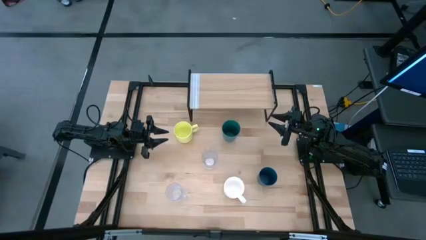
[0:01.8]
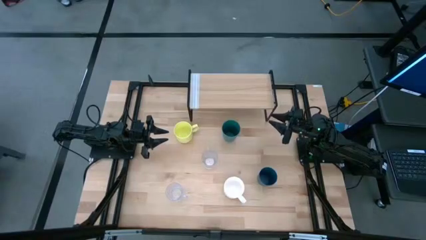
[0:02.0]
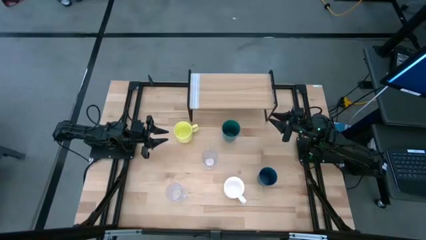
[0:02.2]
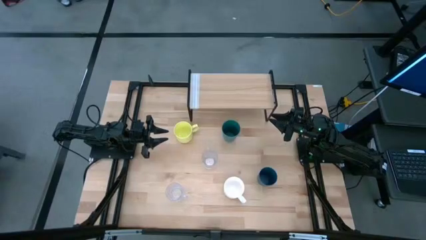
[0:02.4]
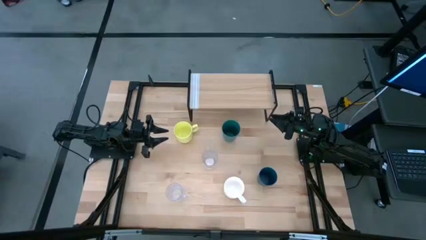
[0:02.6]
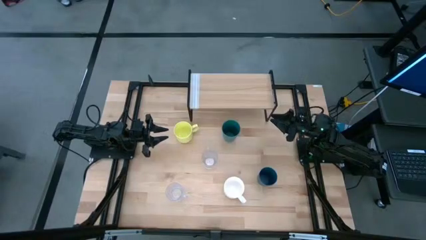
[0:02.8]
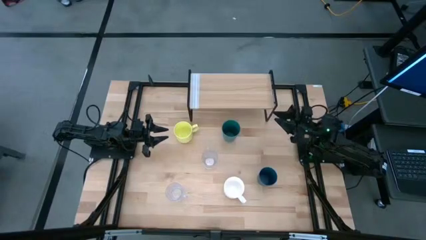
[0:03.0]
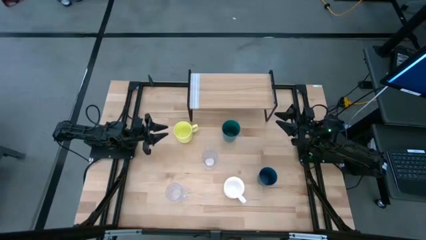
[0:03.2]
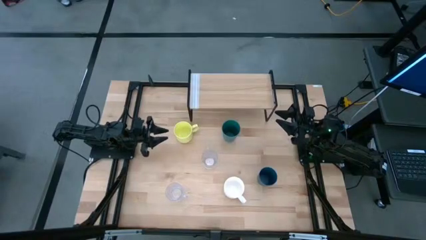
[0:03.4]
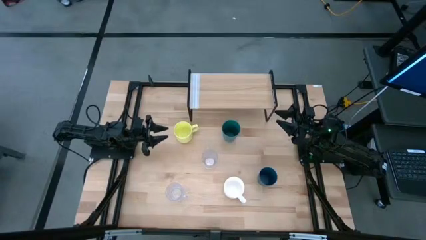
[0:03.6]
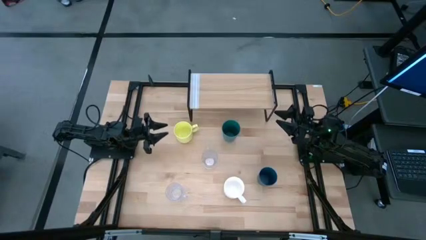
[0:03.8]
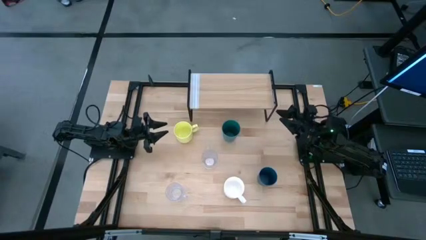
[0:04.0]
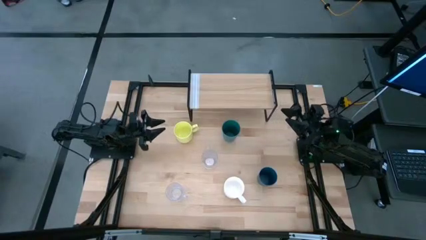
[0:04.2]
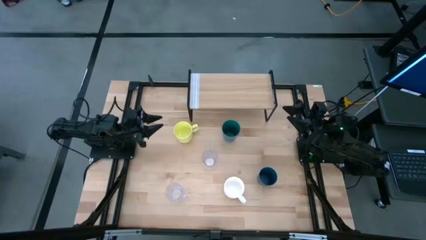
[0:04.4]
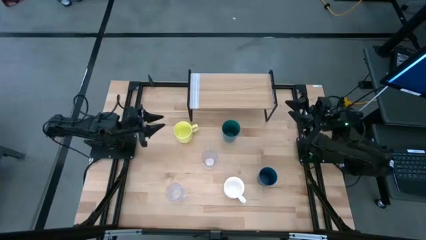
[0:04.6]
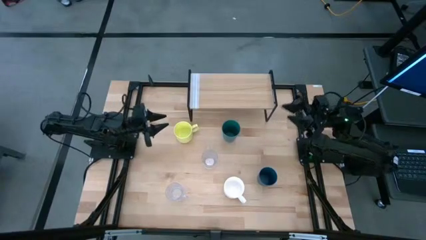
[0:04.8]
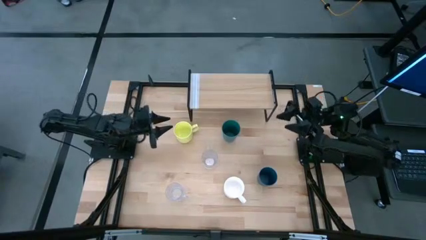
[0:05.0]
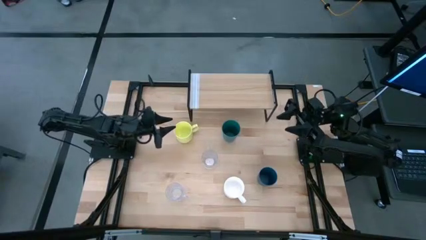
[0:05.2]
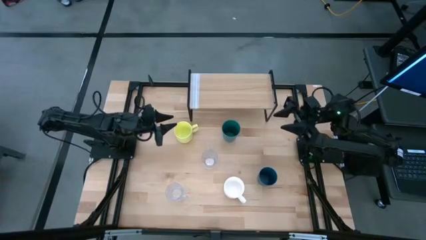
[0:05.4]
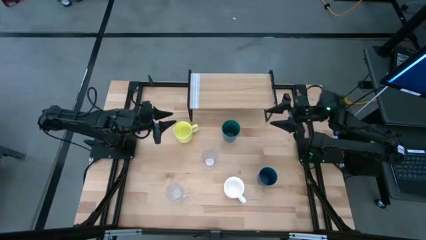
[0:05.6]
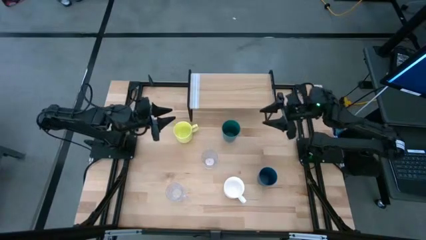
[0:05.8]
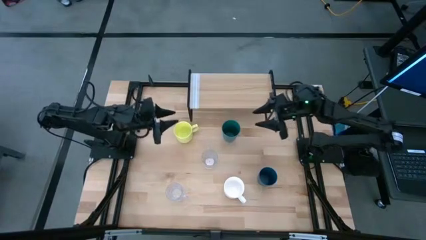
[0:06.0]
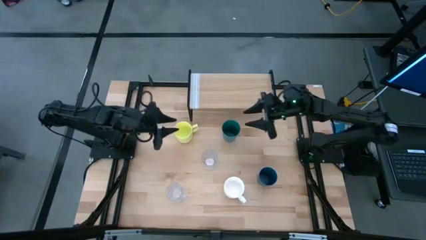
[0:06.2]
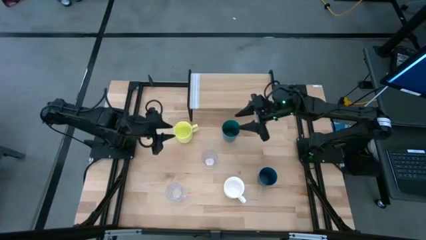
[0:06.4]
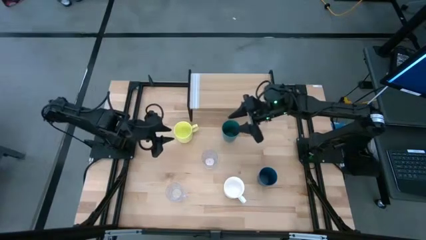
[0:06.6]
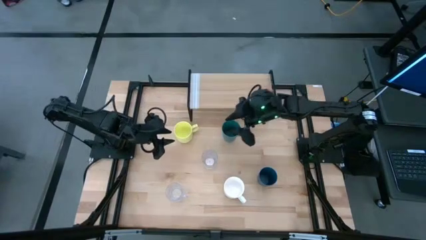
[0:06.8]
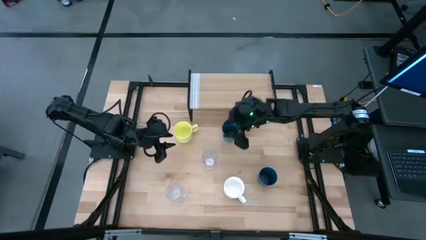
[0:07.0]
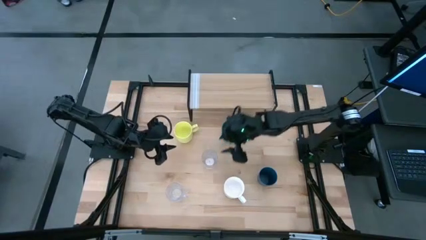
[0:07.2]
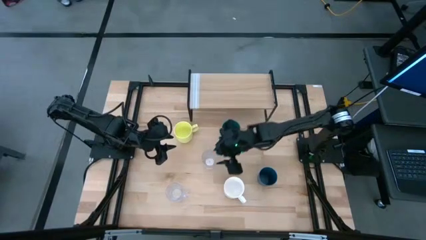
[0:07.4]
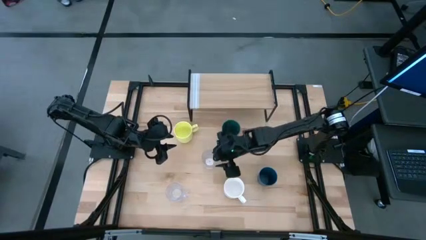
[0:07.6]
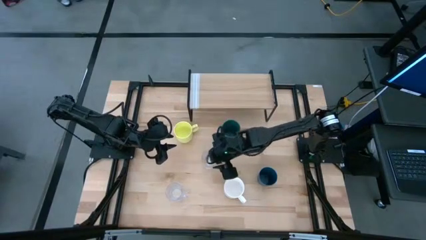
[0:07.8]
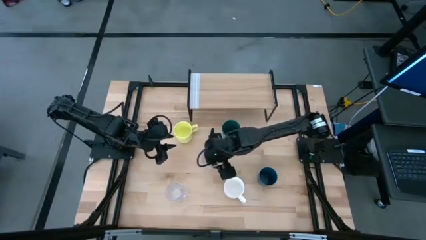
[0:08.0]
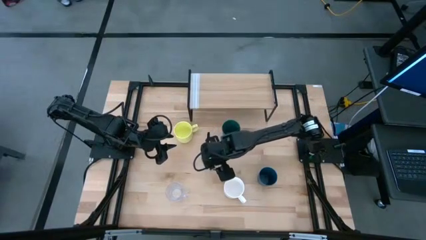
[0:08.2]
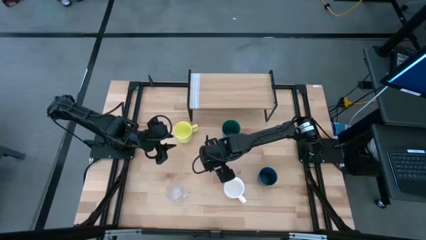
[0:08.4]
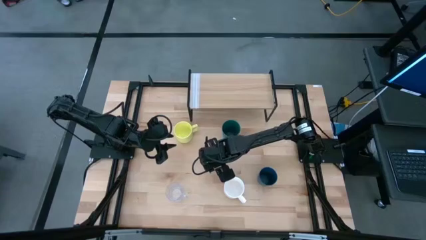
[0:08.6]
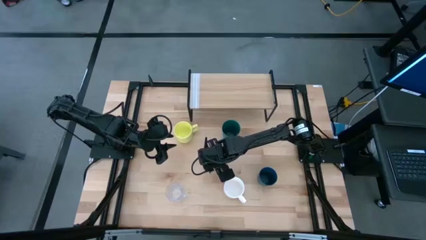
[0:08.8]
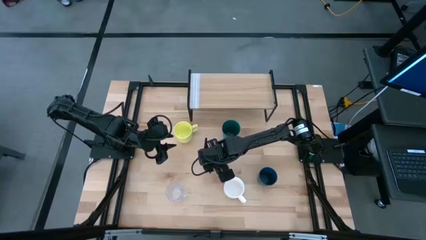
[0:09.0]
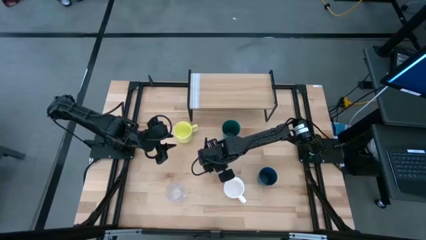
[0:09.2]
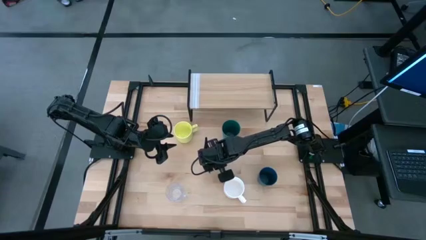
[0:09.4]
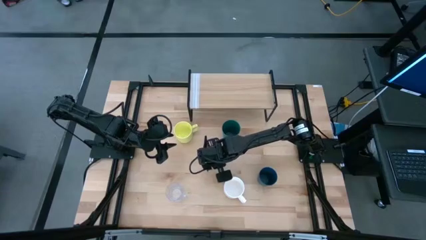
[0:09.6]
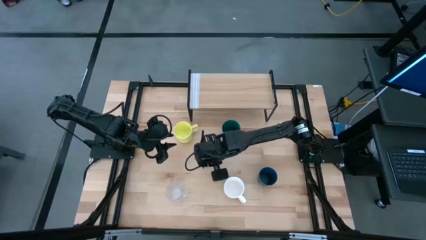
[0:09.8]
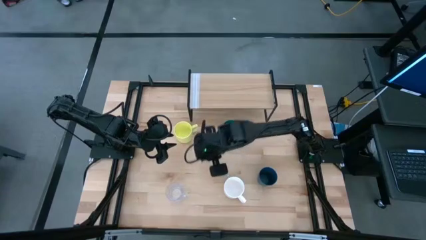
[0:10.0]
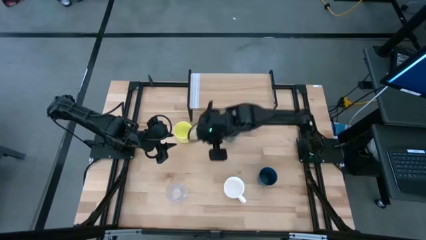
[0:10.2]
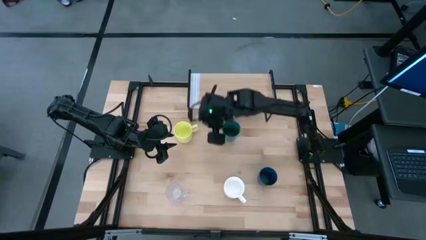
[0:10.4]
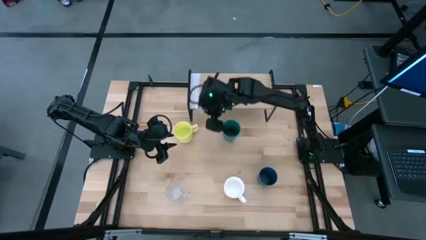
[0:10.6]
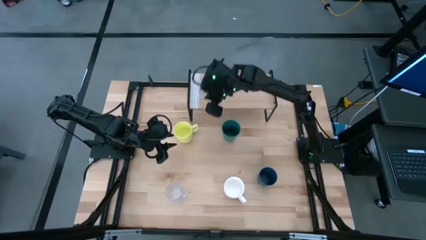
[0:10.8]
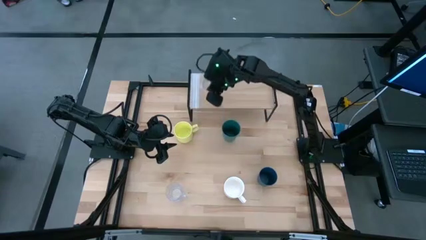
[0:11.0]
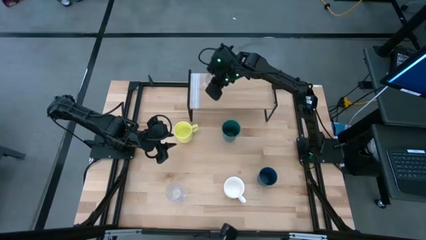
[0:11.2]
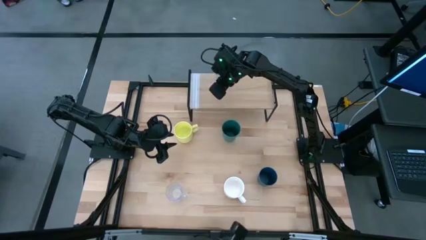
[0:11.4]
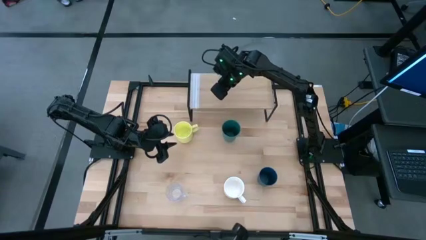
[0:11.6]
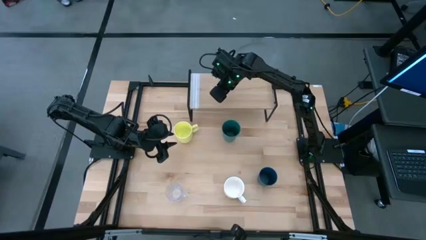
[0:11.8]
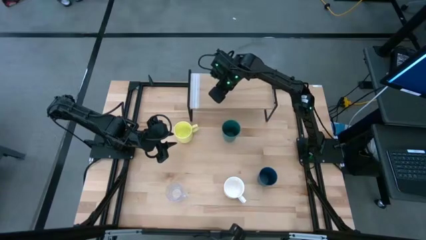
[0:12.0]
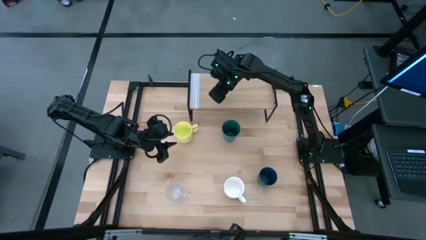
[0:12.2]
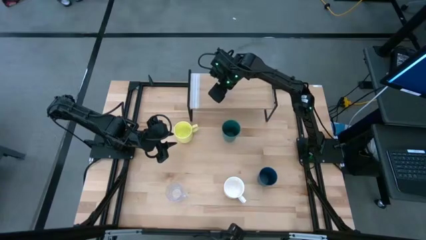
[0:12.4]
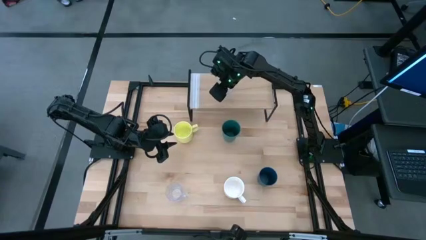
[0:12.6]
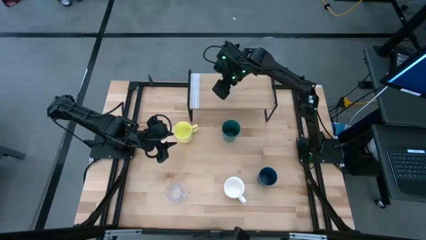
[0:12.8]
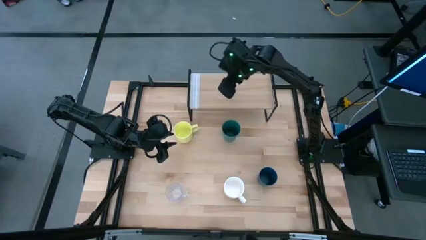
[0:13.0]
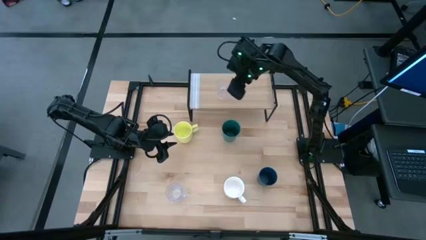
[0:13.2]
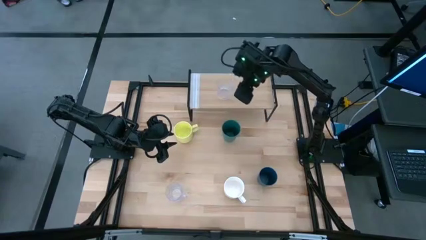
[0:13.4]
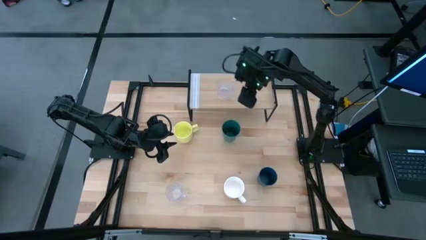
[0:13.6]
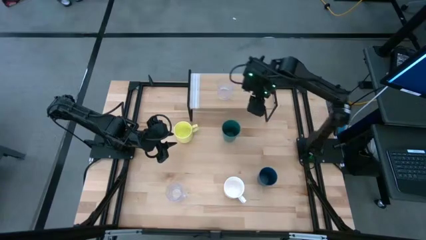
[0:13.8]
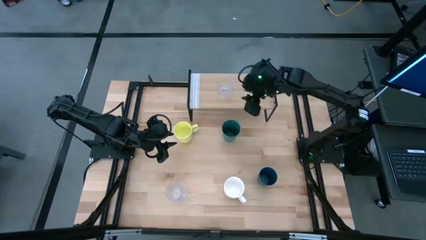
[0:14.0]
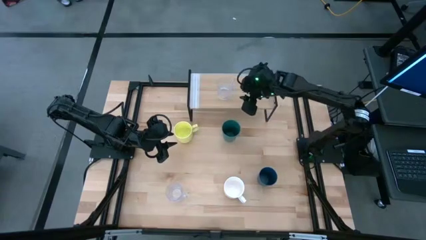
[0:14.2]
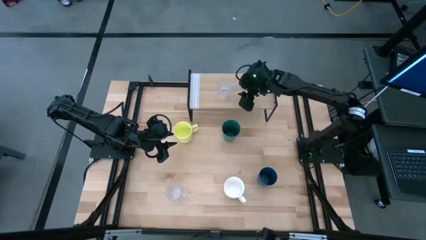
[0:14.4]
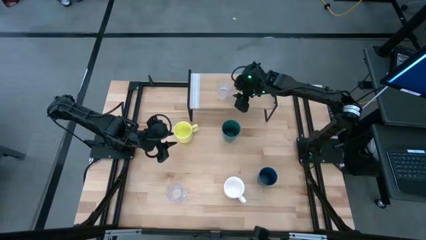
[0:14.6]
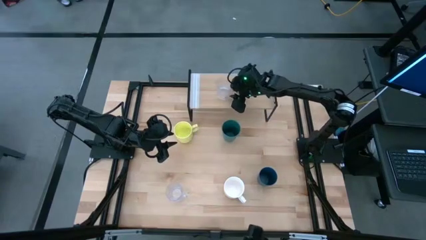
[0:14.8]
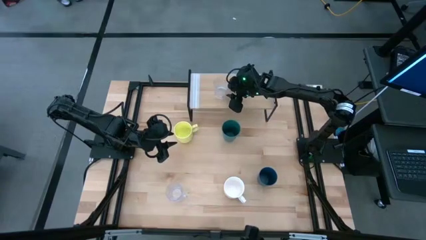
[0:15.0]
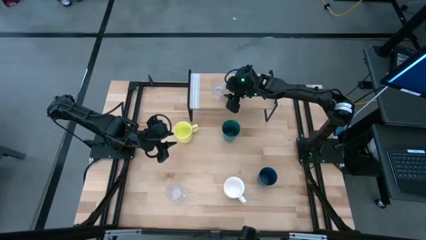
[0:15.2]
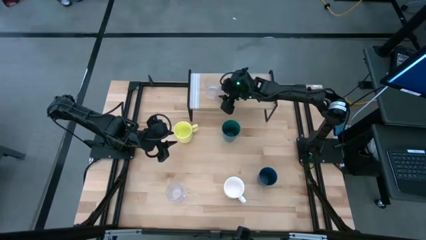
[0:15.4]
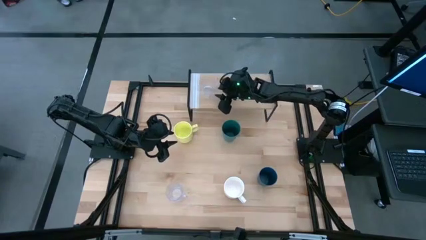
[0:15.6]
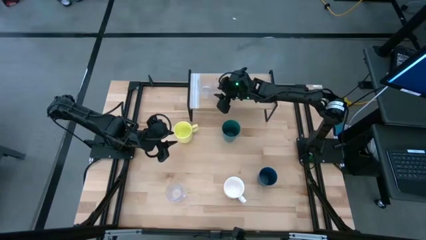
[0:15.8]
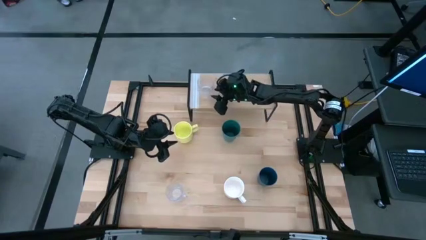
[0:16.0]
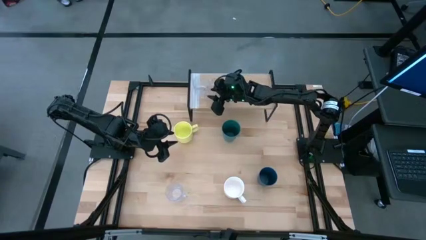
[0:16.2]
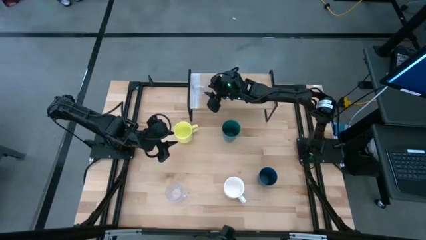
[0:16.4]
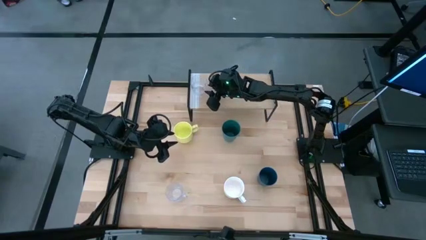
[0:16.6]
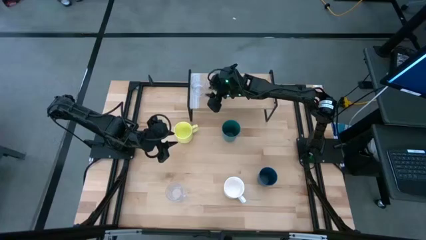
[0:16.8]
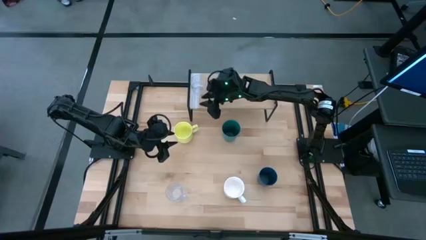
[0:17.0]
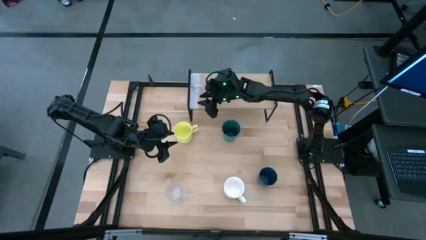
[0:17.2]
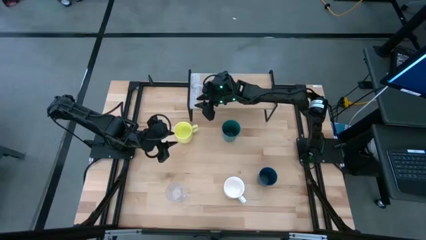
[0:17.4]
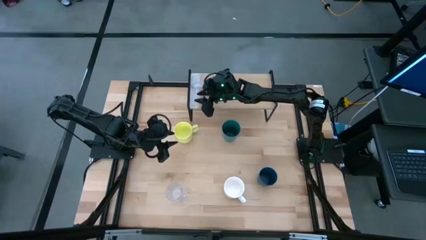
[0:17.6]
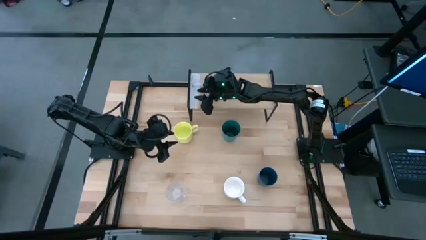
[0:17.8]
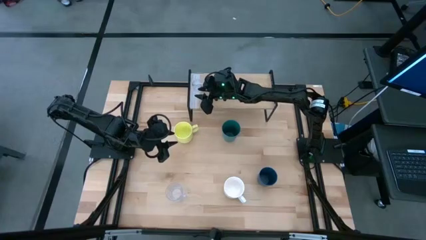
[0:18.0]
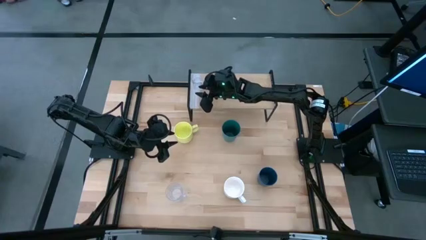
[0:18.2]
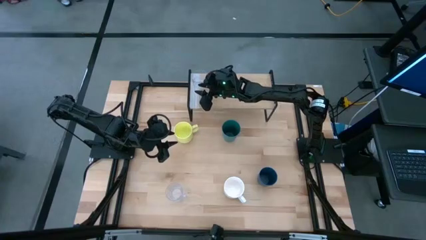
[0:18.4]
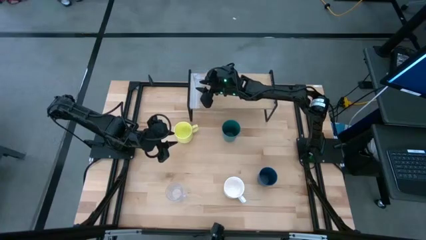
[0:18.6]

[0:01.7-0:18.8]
Task: Stack small to large cups/mugs on shelf
Put the top transparent mug on the shelf
